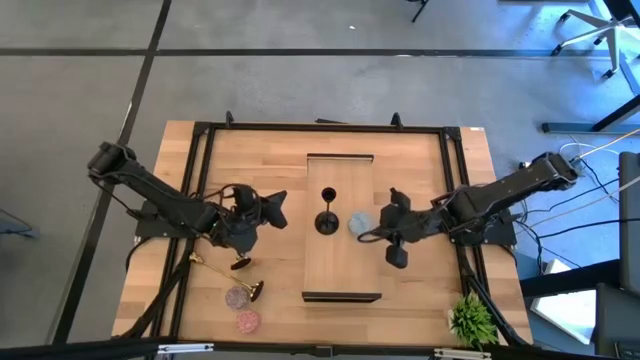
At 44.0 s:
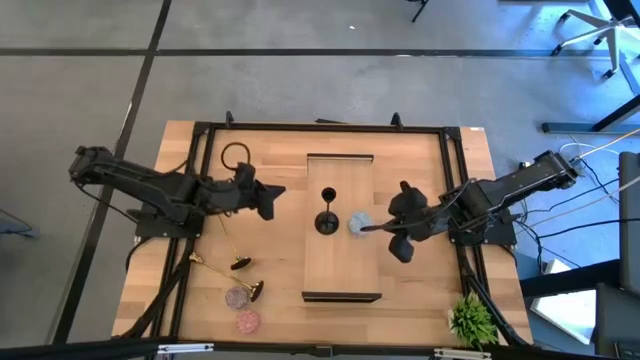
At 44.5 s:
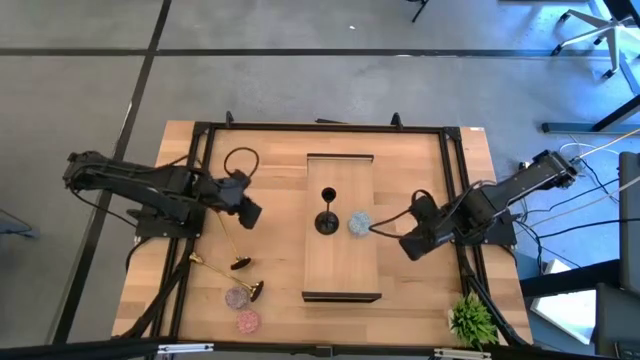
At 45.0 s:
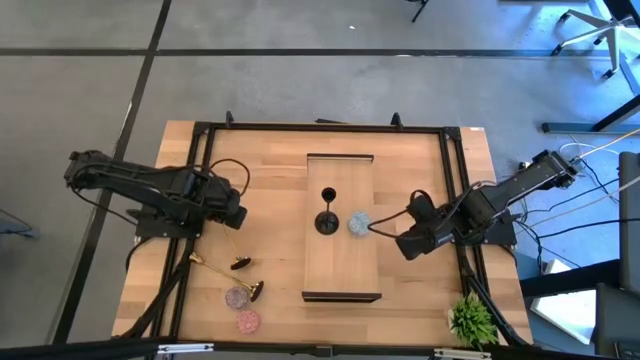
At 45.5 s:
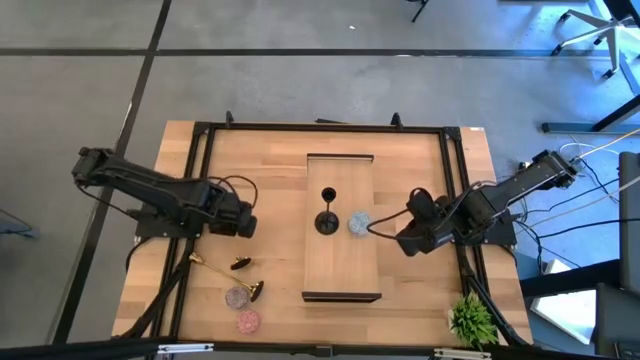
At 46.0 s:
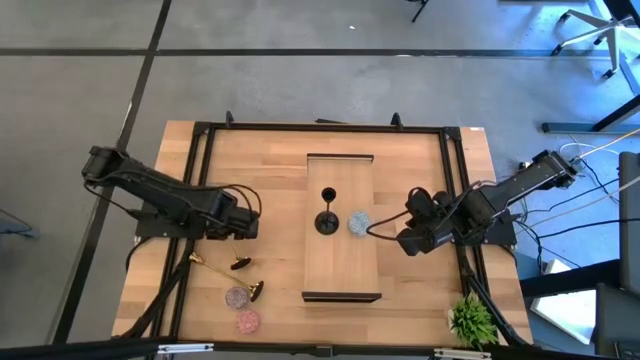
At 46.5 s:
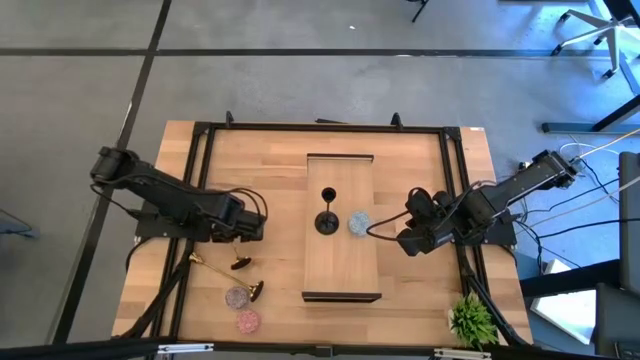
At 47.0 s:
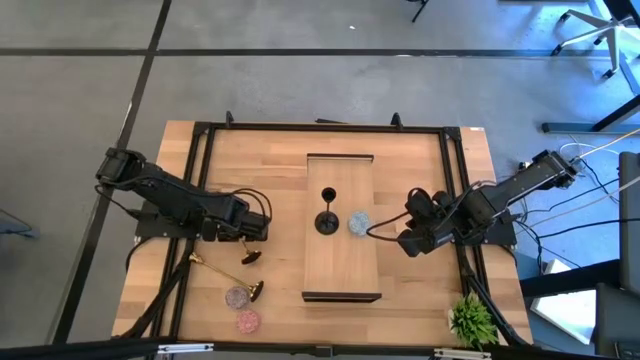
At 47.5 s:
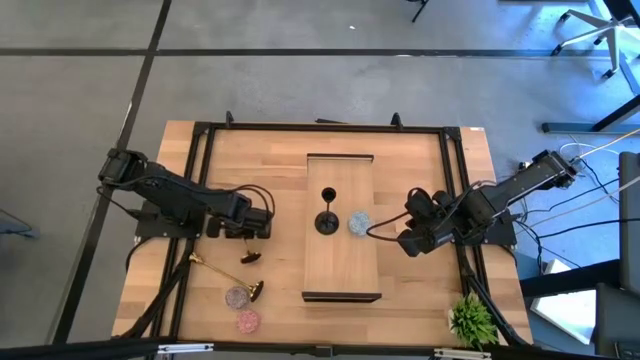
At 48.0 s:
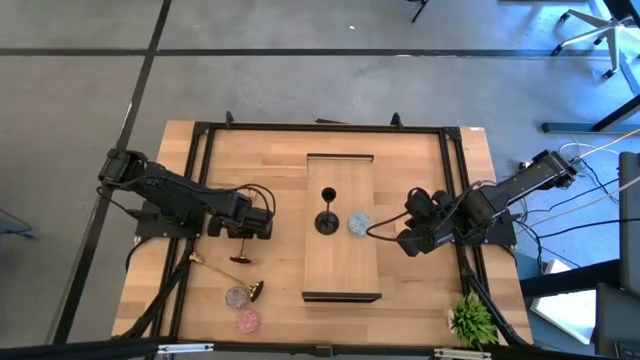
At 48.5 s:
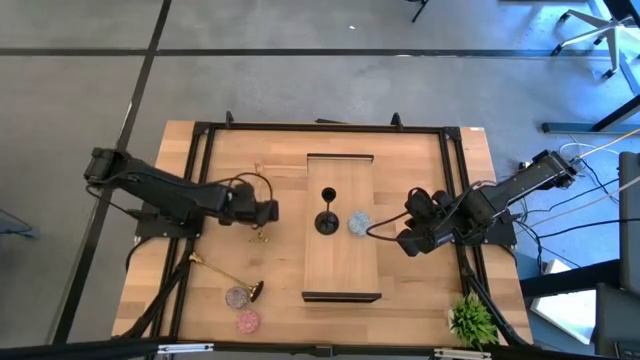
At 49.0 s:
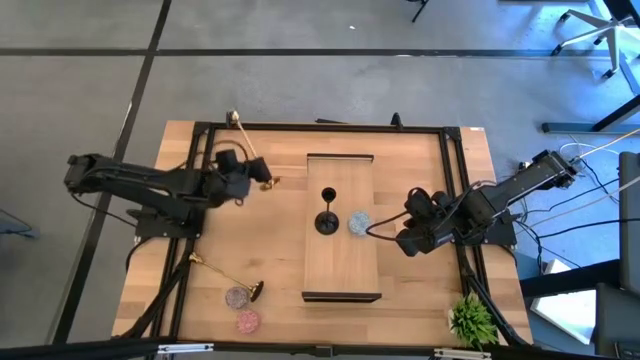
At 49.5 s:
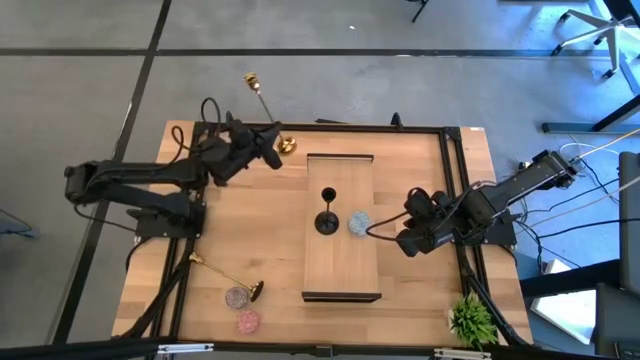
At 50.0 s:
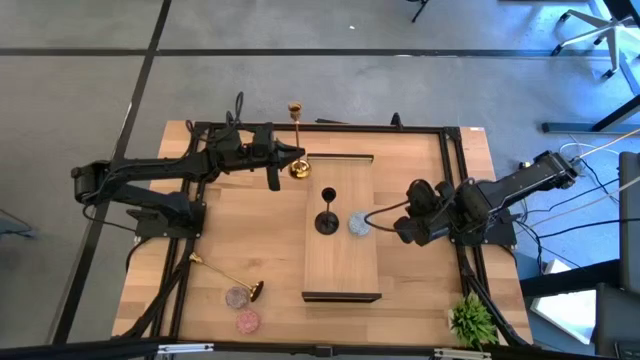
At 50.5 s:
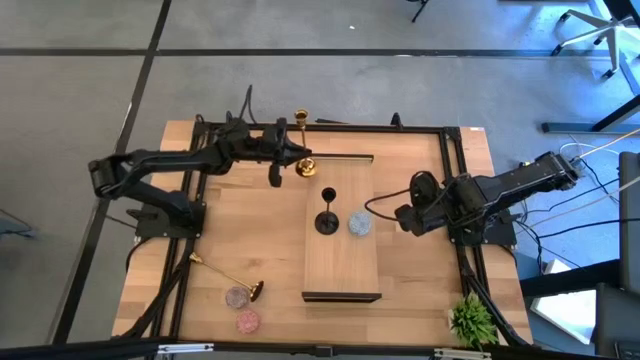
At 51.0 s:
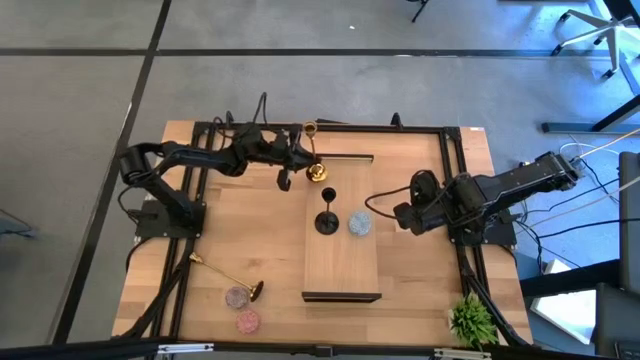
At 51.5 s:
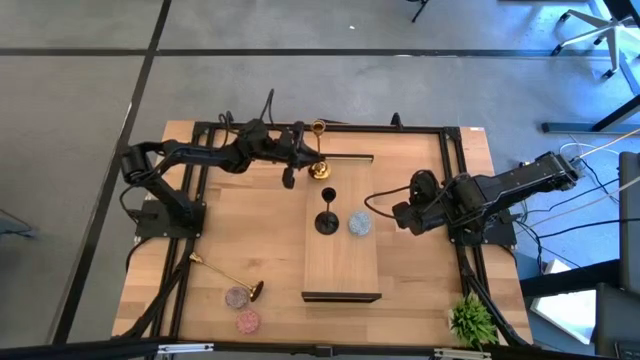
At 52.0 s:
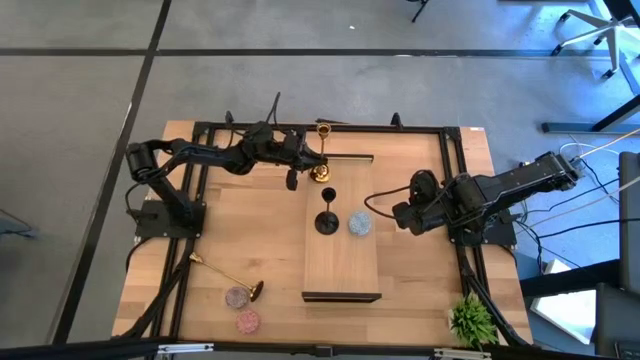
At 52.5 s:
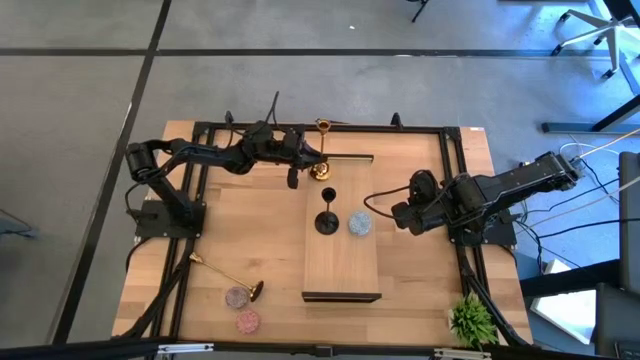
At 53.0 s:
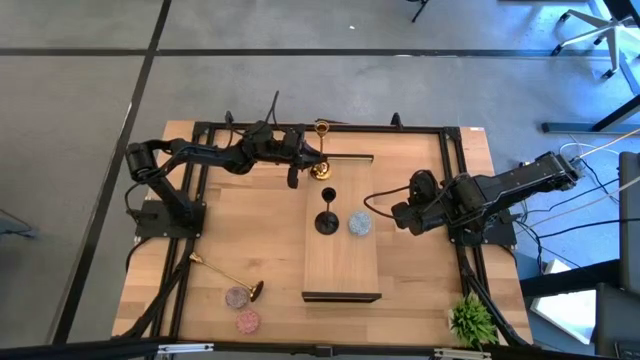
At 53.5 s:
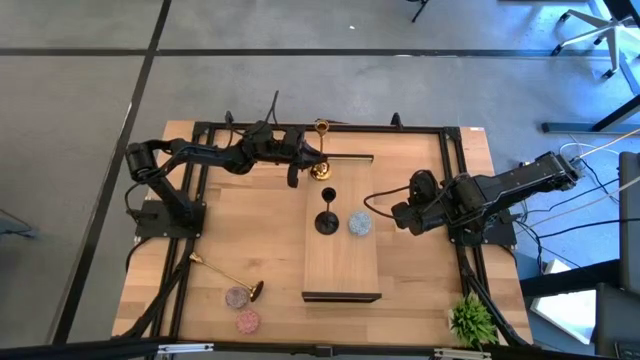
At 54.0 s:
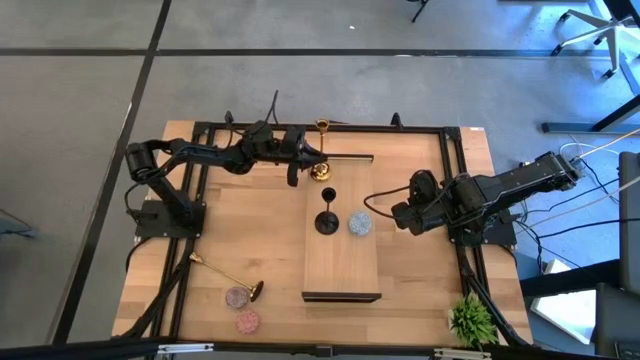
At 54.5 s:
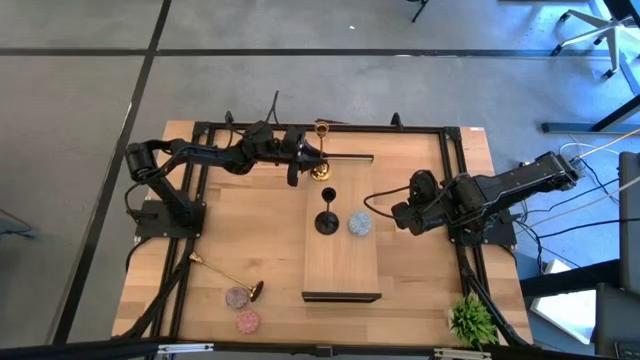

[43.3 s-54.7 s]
Task: Pick & Place candle stick holders
Put the top golden candle holder on the shelf

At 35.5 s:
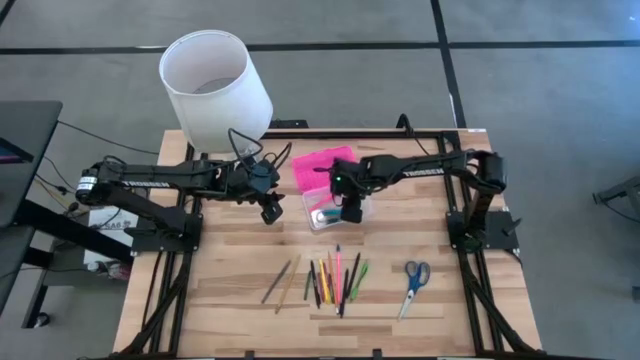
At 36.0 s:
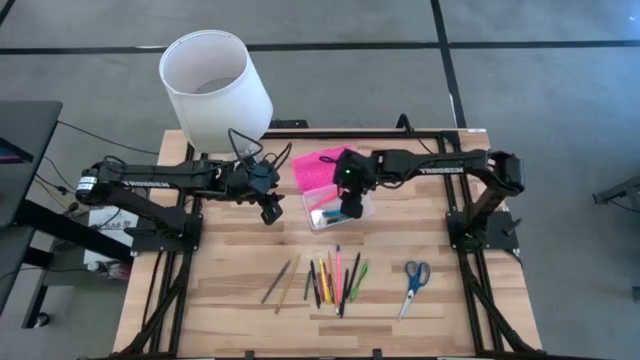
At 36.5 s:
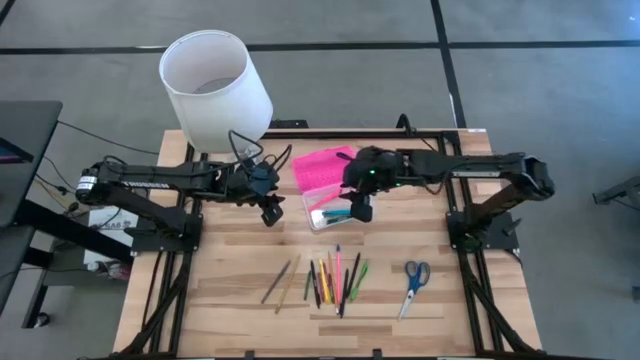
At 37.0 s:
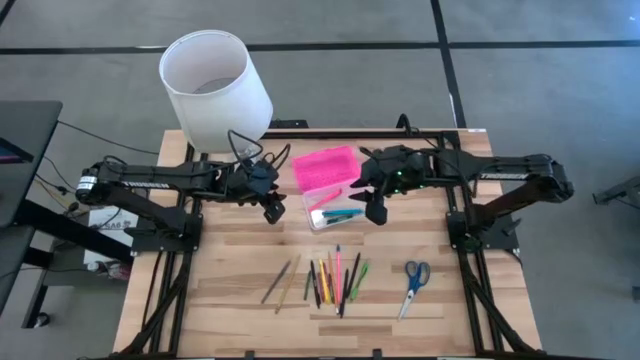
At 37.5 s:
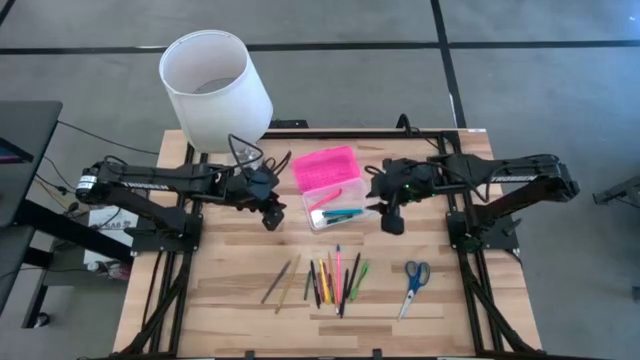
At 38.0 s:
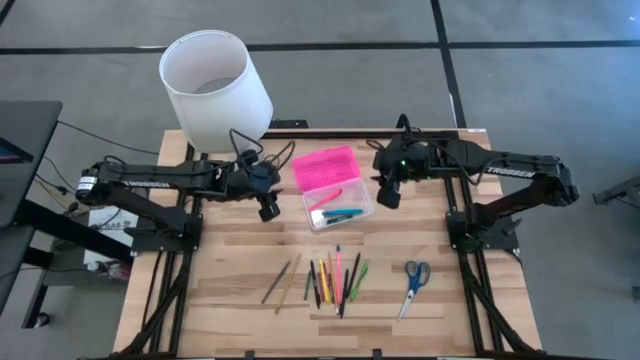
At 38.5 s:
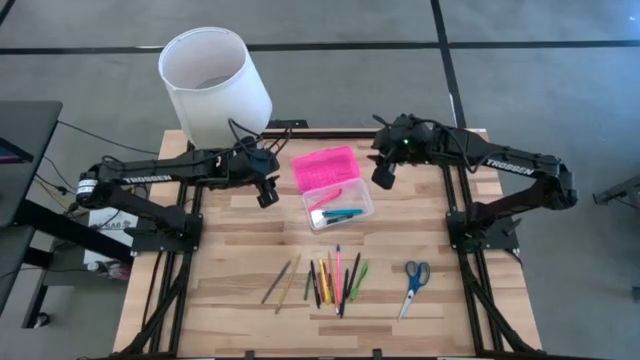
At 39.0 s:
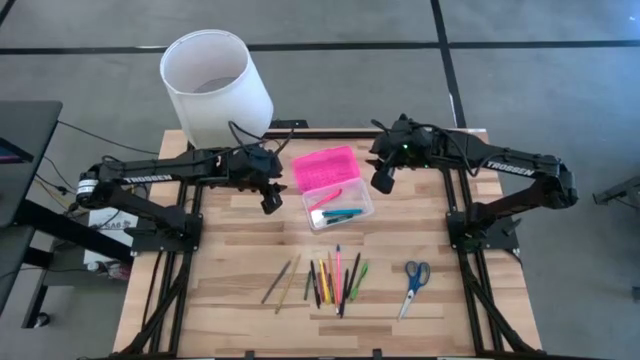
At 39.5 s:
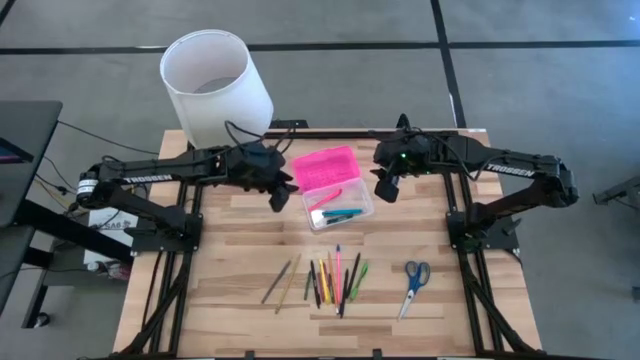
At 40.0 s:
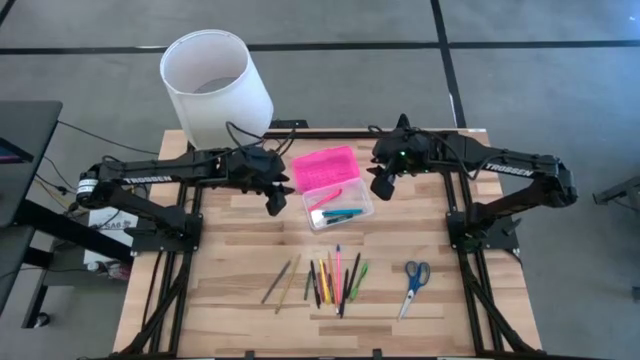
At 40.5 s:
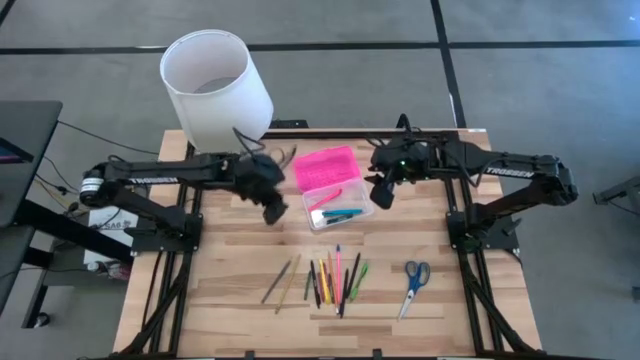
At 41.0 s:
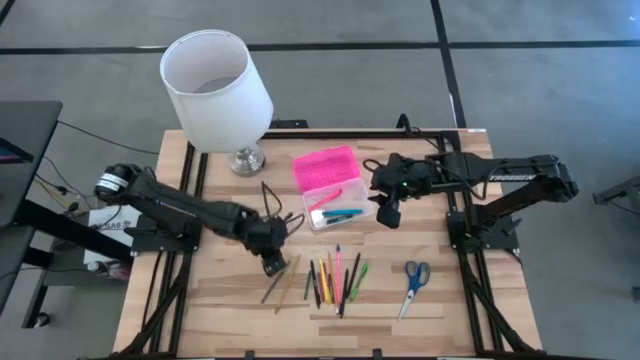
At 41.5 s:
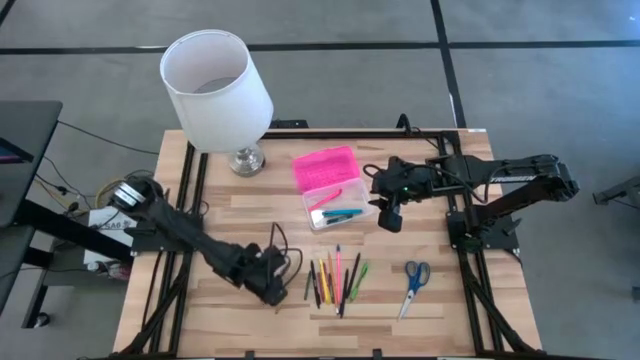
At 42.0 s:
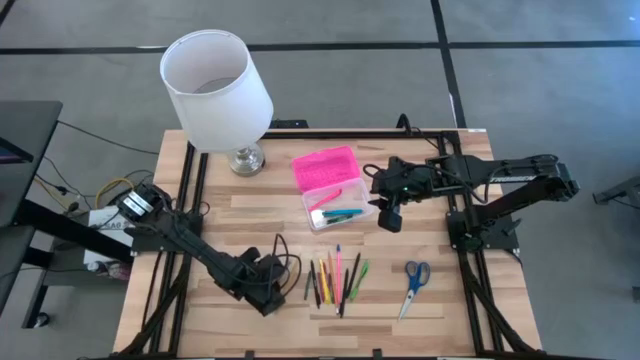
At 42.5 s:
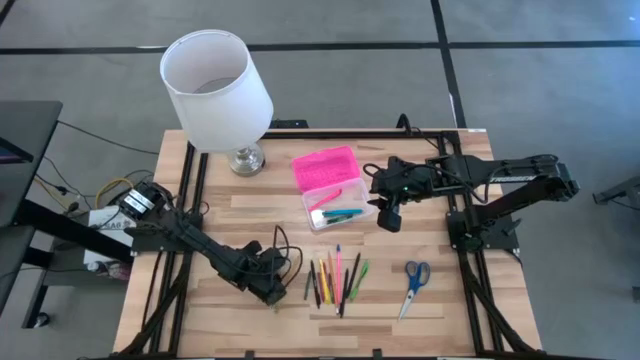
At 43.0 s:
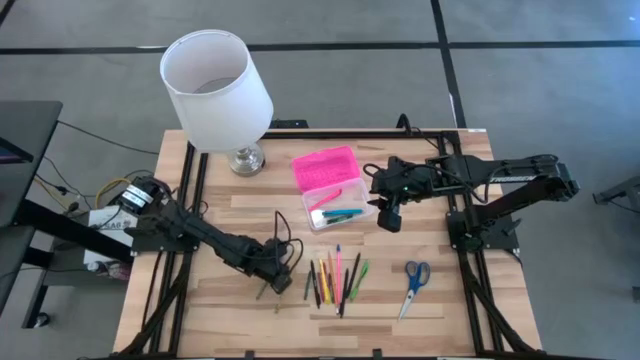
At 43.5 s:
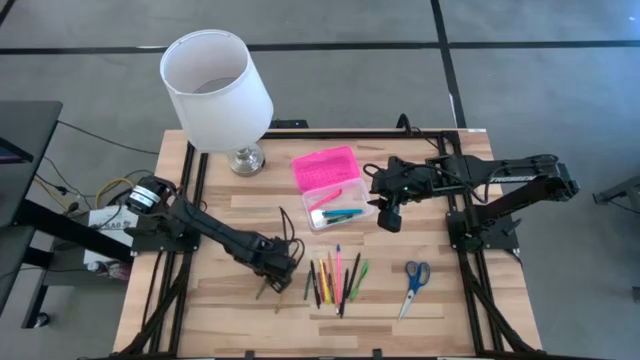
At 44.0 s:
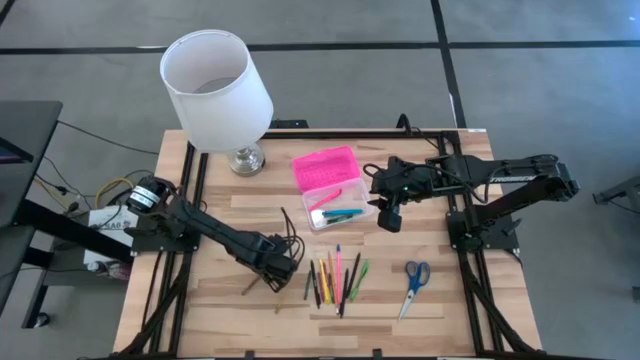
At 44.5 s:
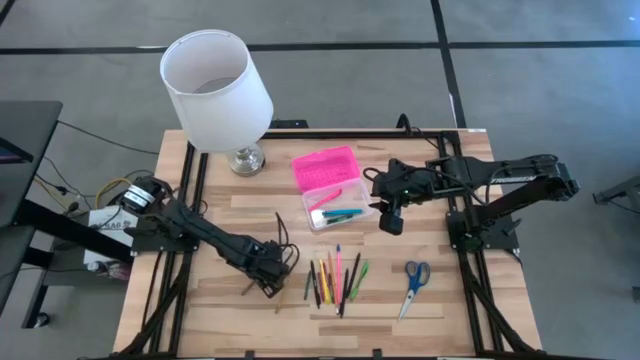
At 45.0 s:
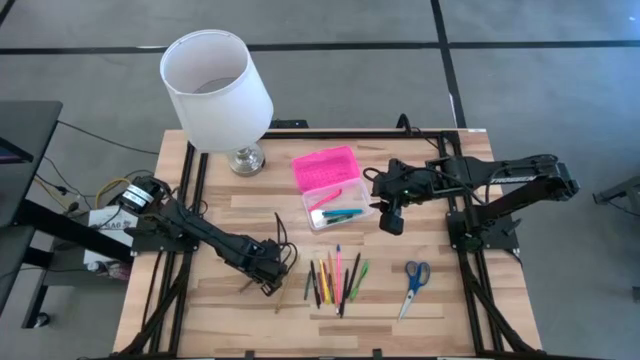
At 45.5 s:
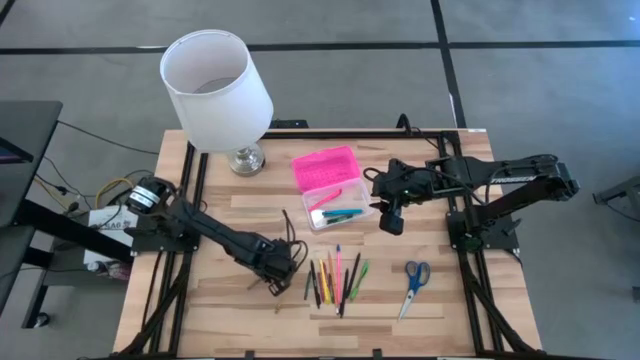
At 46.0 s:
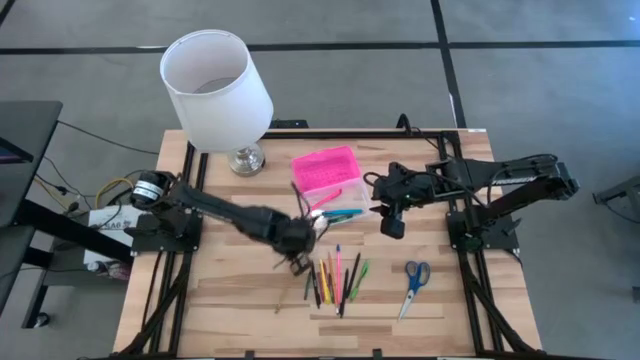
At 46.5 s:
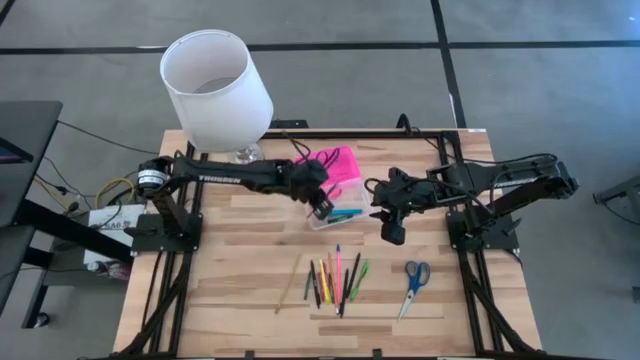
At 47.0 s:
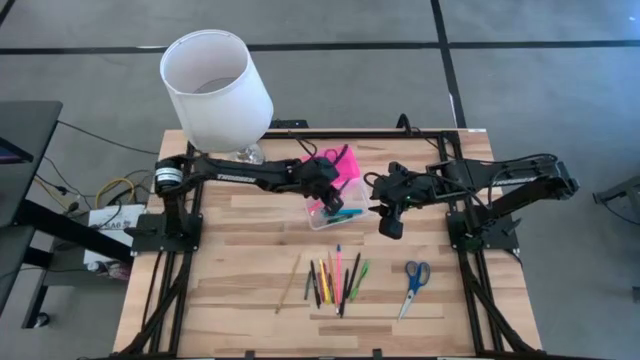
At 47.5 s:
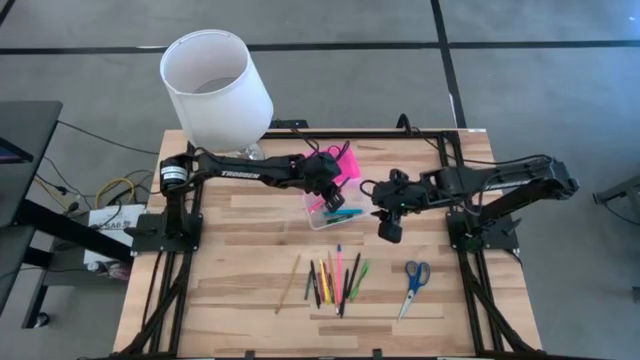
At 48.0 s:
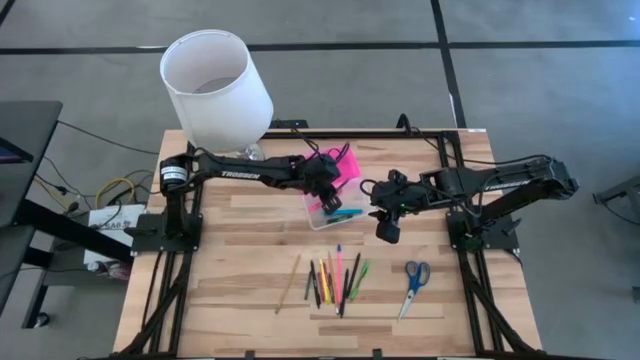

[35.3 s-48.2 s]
Task: Pick & place school supplies into a supply box
Put the gray pen into the pink supply box
